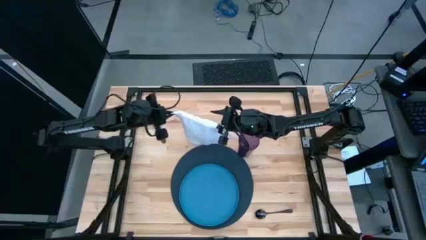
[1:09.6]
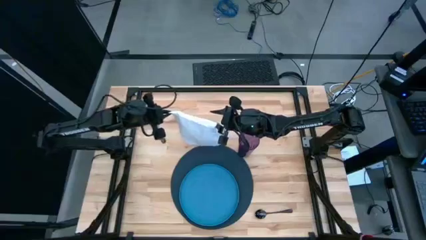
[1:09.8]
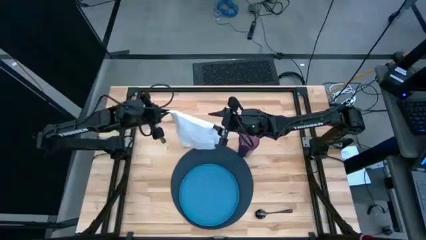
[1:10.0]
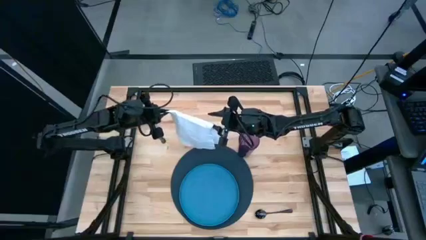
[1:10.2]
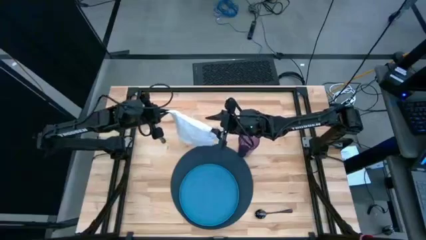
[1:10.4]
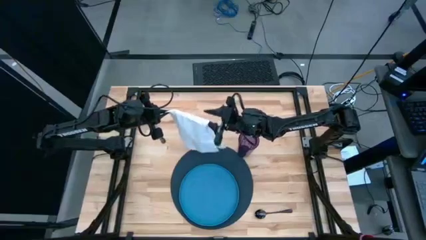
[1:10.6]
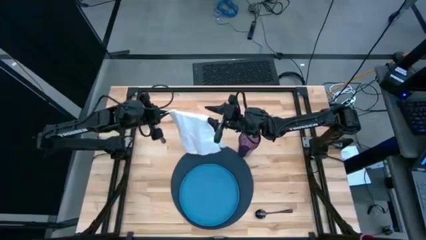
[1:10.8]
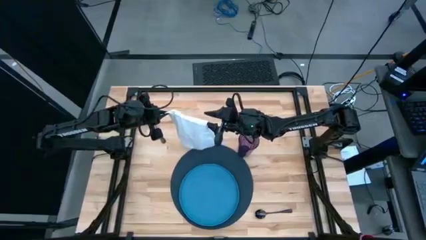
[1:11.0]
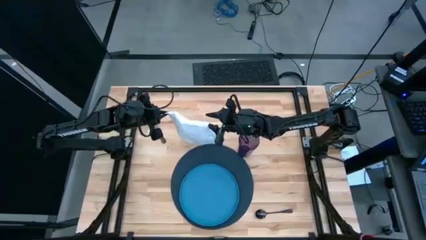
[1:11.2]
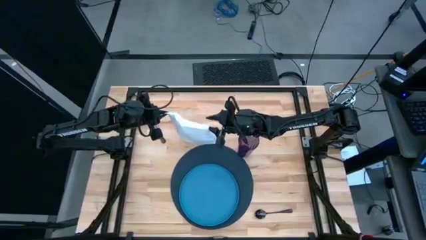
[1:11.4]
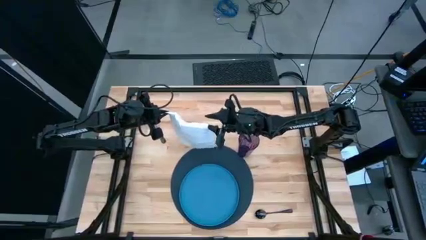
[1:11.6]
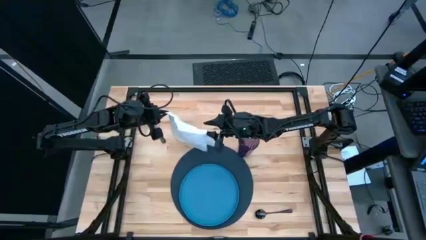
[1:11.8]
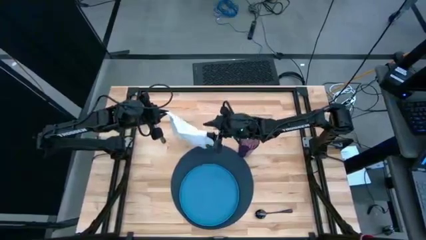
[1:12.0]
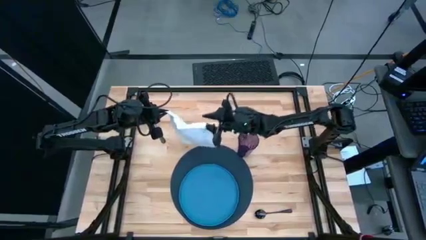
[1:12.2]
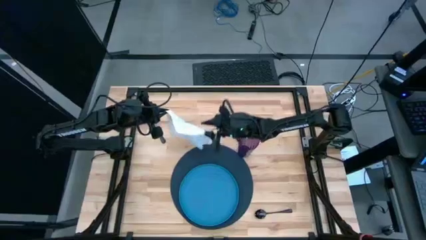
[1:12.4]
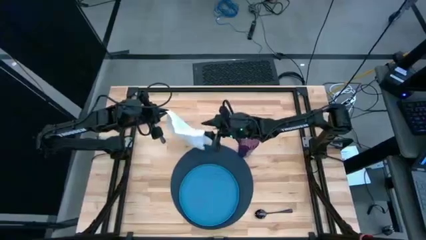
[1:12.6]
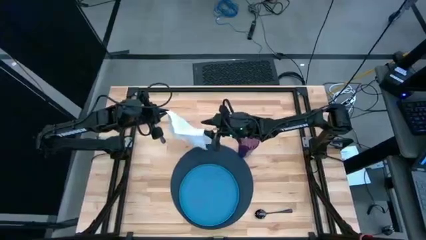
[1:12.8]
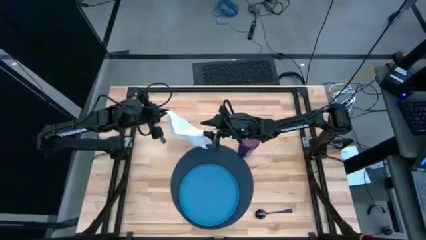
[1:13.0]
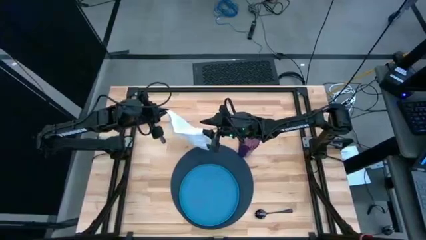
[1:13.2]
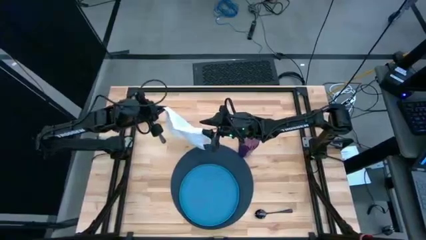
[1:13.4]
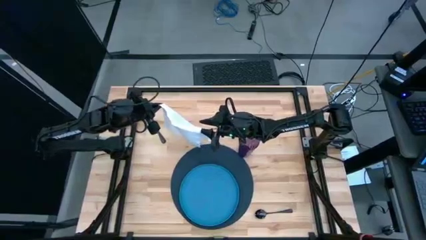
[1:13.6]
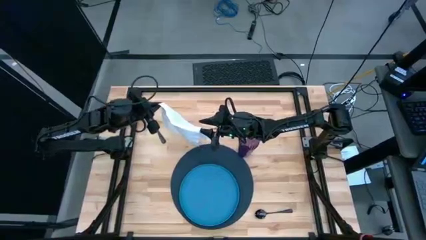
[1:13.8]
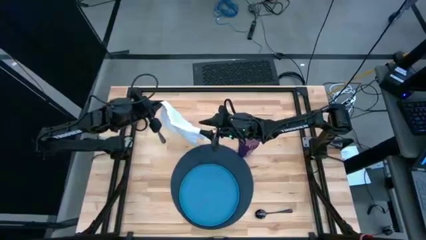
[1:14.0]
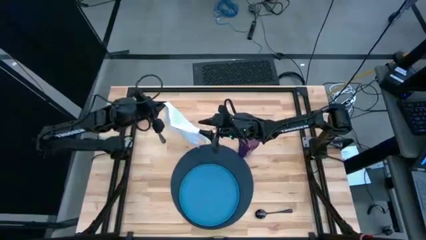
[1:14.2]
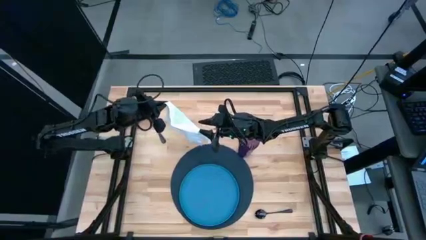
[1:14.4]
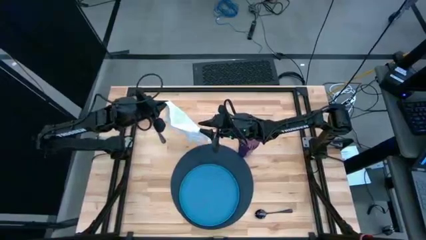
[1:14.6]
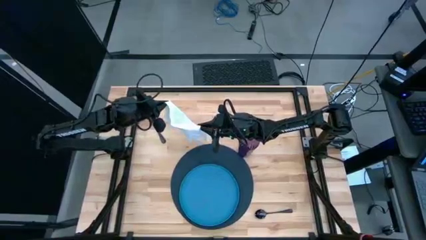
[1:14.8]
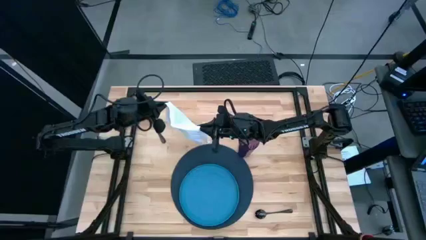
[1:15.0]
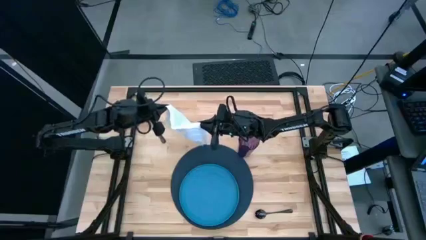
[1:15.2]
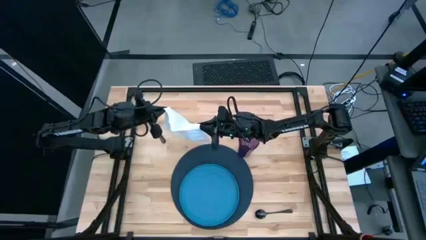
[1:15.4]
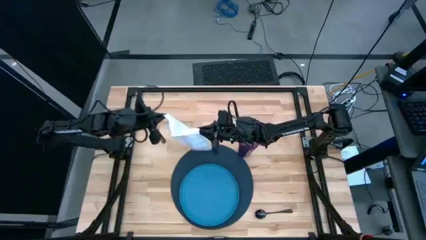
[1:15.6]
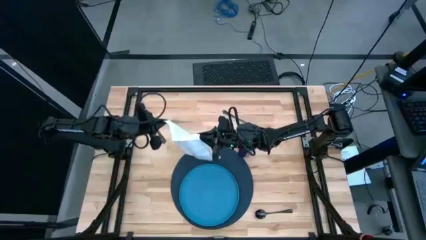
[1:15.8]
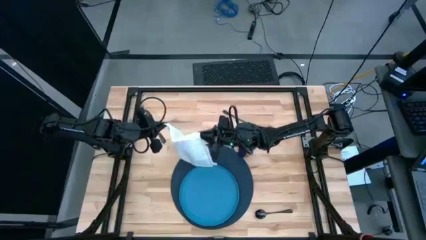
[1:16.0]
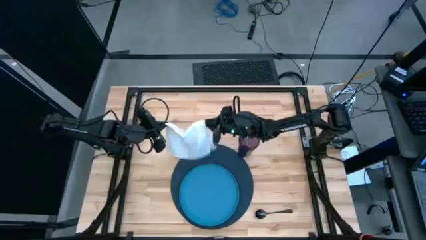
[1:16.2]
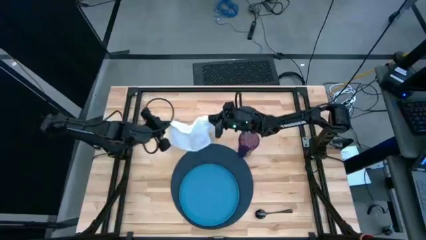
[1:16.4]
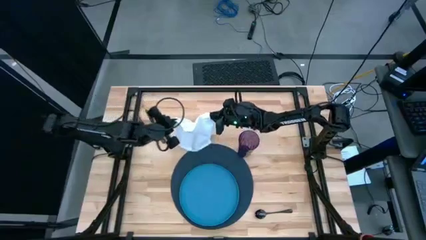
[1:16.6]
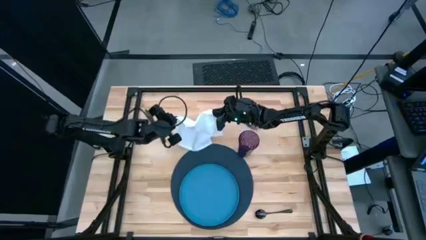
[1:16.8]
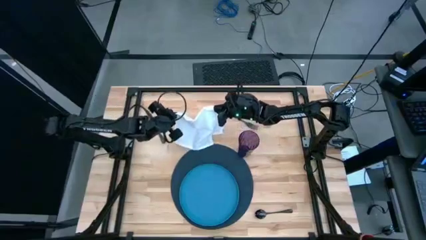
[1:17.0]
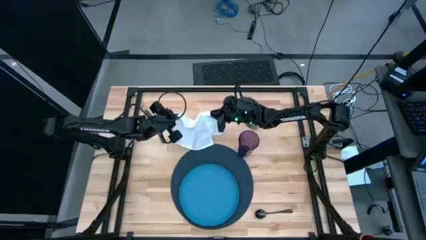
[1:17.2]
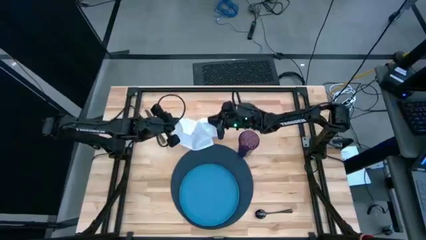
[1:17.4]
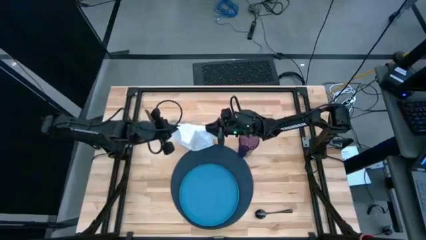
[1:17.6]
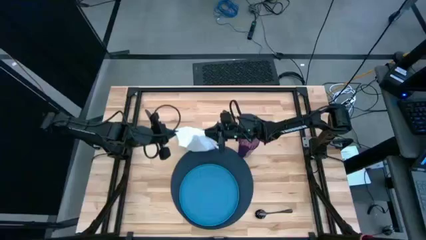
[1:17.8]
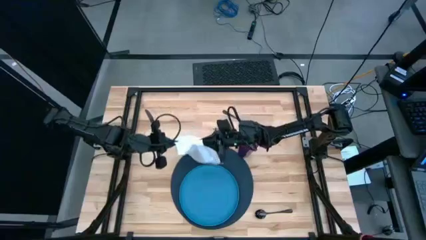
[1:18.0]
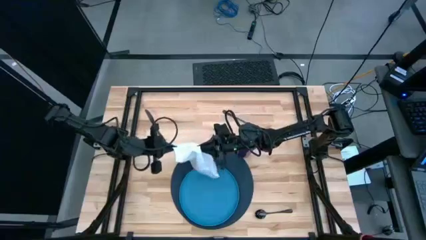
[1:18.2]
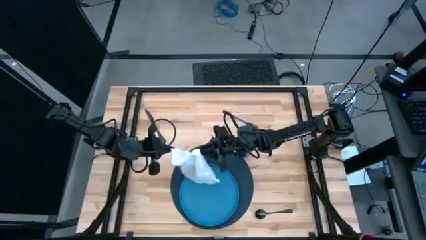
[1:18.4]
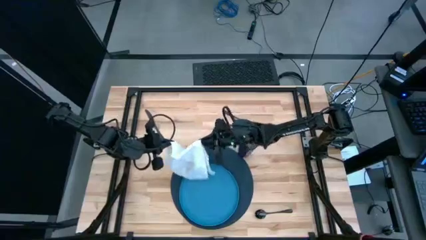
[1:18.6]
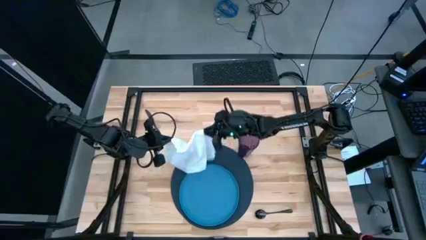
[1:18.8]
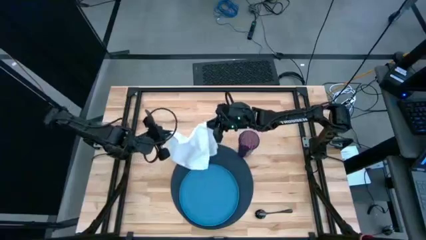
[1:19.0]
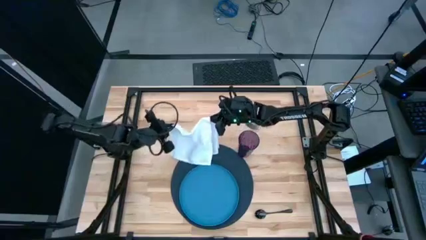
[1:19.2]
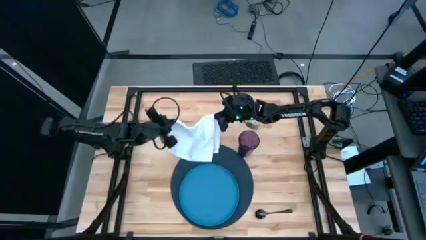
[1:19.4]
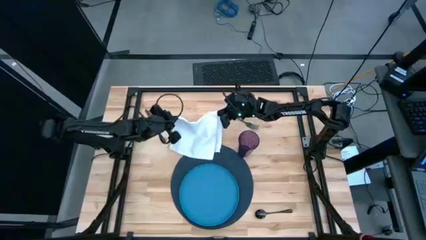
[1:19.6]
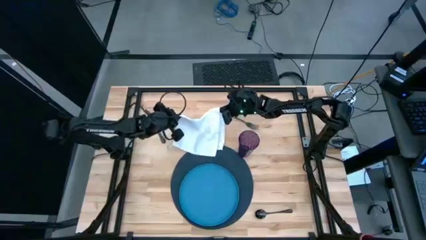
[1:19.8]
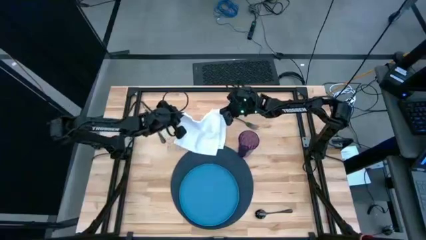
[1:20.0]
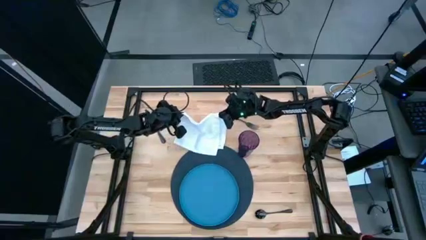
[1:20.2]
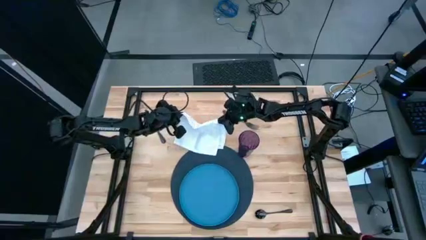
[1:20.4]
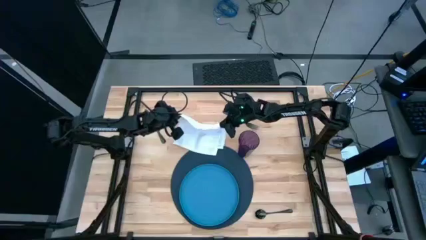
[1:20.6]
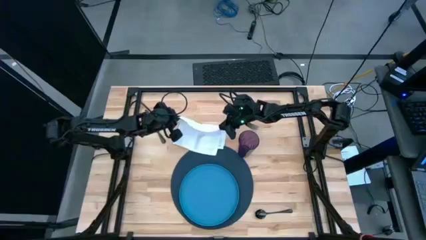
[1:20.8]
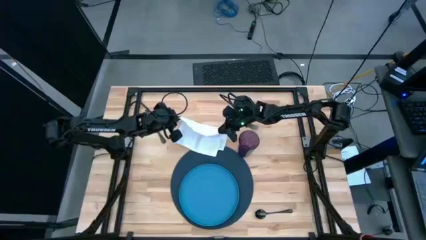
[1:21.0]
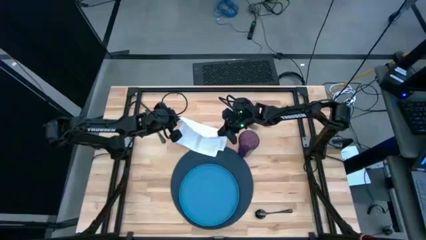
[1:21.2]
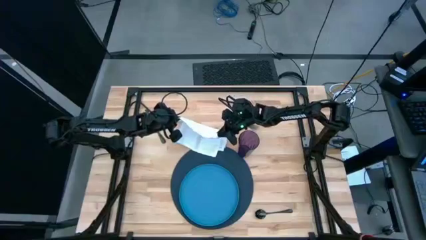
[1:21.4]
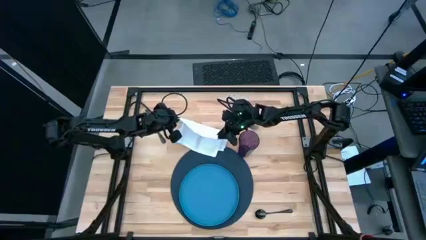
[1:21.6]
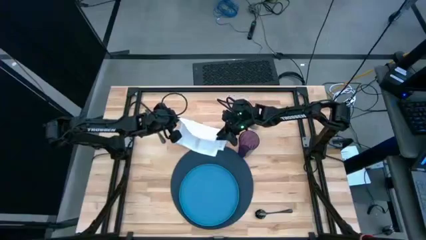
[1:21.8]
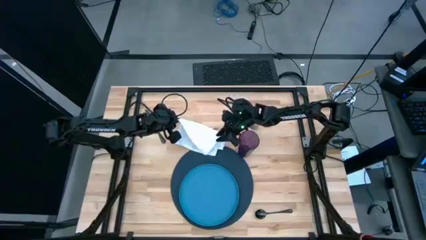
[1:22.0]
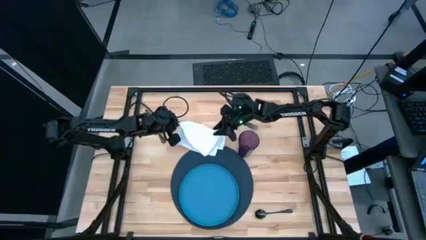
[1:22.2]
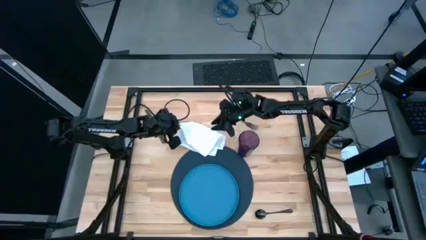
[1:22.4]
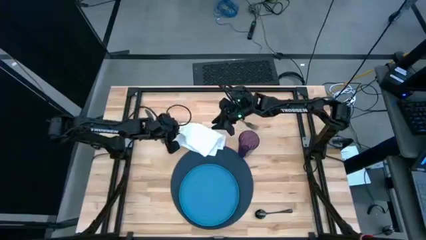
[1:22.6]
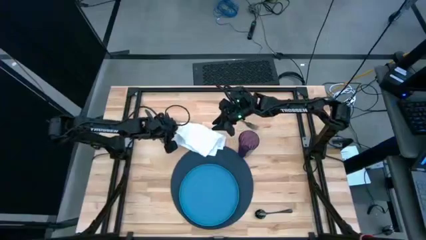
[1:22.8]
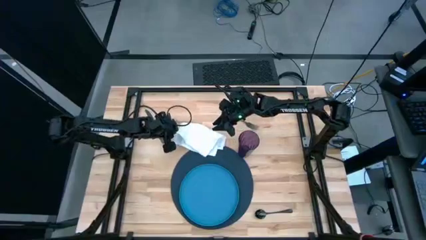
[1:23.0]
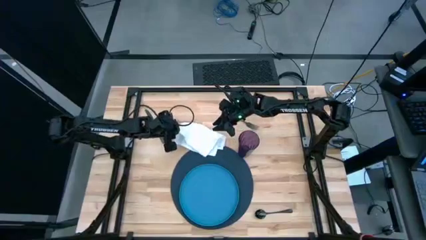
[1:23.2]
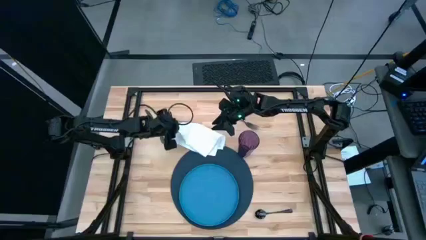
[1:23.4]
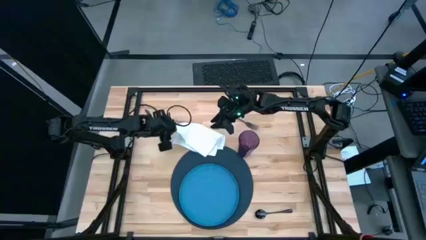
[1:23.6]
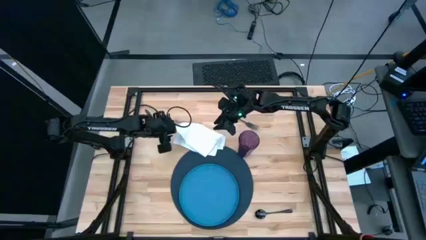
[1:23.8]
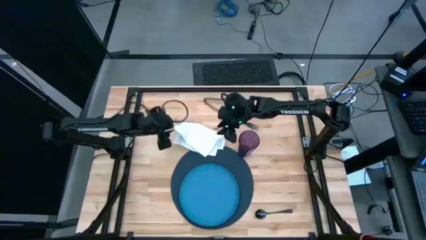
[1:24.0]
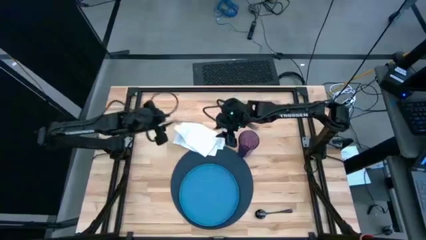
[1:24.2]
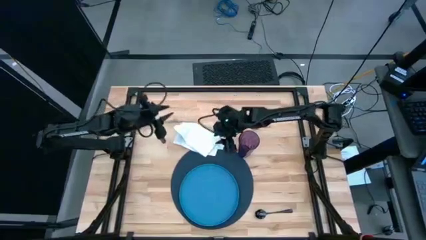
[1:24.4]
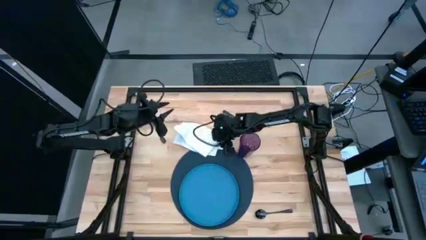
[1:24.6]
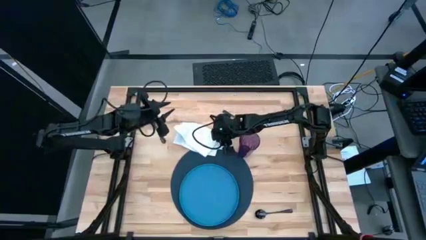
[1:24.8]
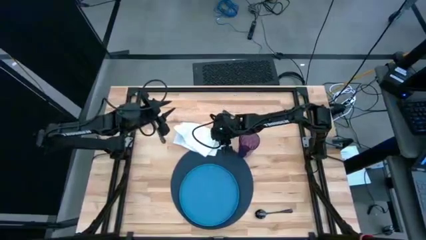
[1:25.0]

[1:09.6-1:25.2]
Task: Set table place
Fold the white napkin
